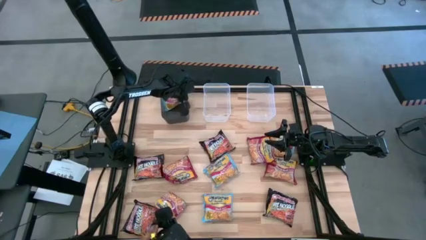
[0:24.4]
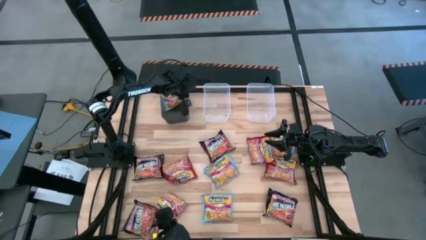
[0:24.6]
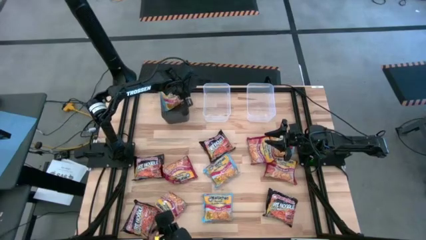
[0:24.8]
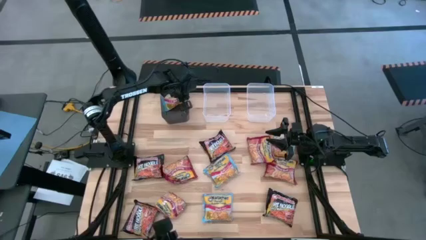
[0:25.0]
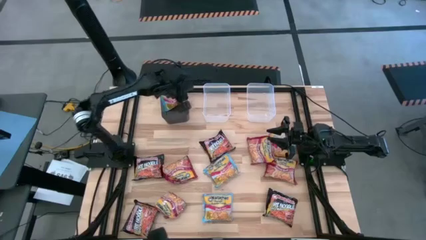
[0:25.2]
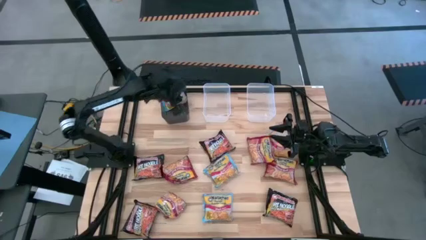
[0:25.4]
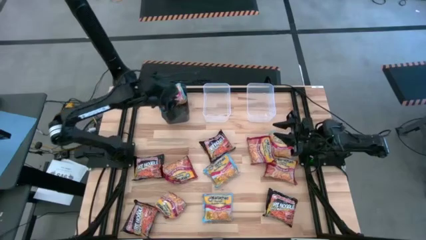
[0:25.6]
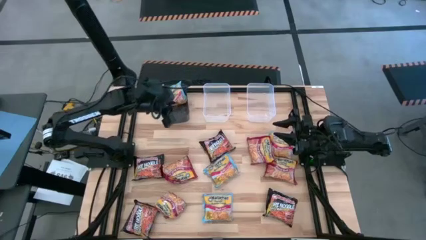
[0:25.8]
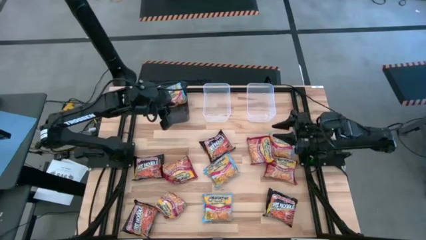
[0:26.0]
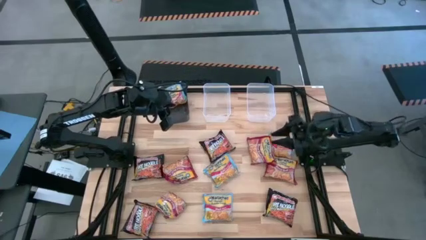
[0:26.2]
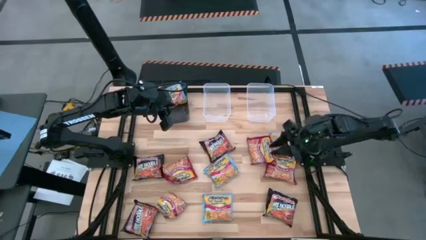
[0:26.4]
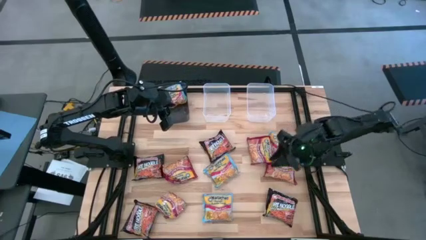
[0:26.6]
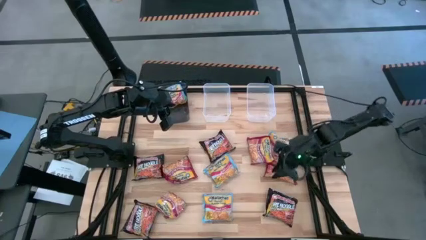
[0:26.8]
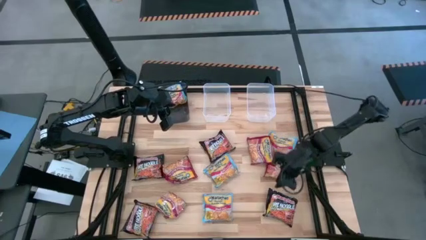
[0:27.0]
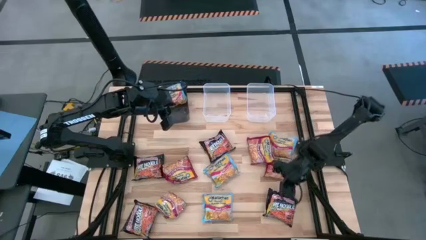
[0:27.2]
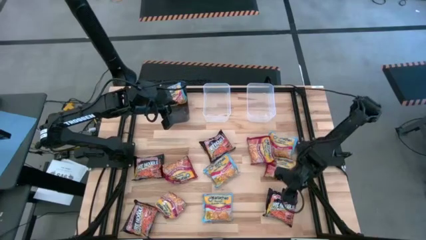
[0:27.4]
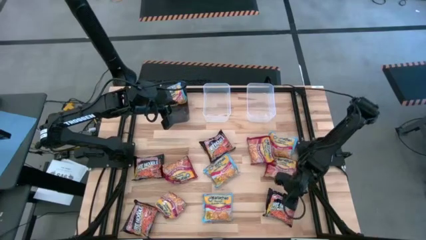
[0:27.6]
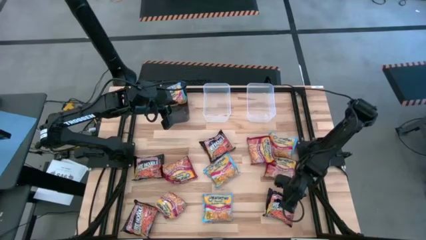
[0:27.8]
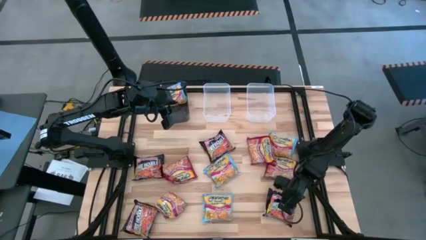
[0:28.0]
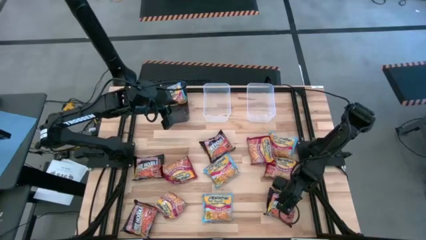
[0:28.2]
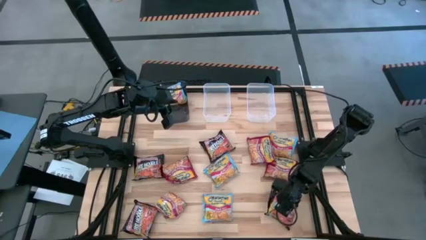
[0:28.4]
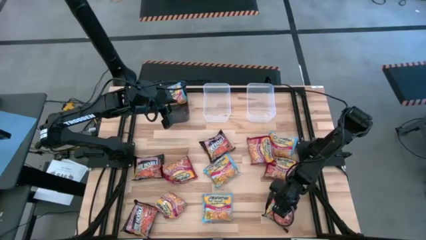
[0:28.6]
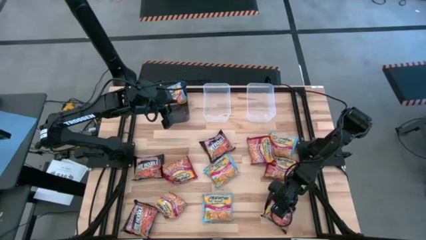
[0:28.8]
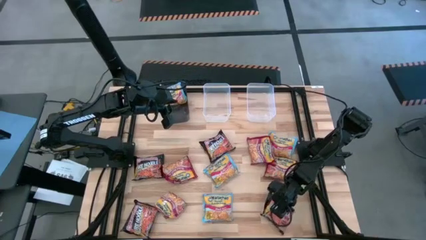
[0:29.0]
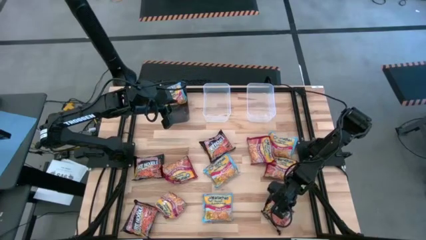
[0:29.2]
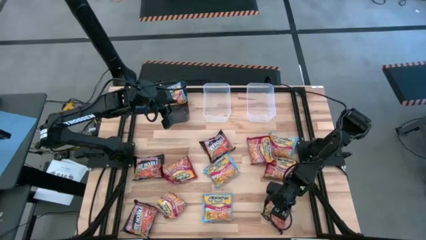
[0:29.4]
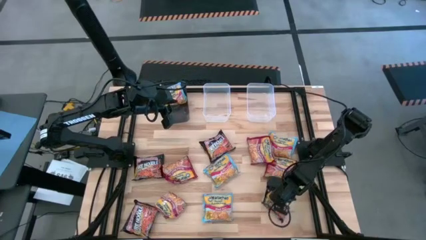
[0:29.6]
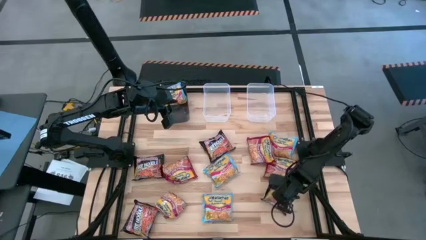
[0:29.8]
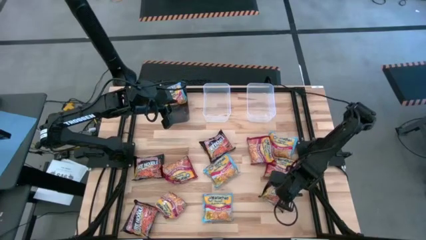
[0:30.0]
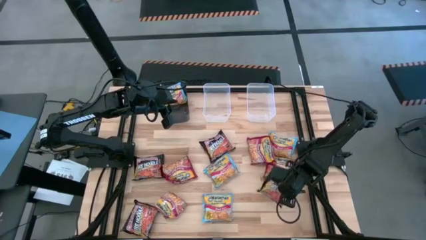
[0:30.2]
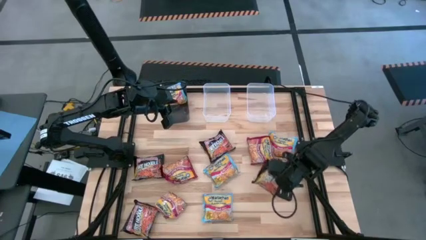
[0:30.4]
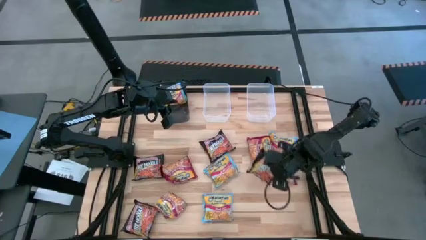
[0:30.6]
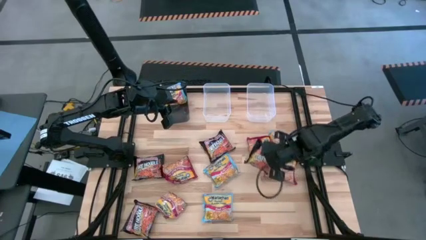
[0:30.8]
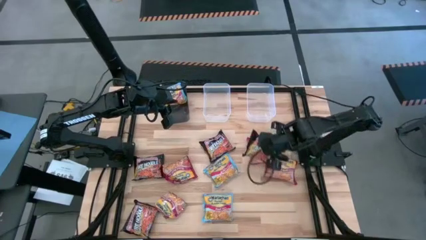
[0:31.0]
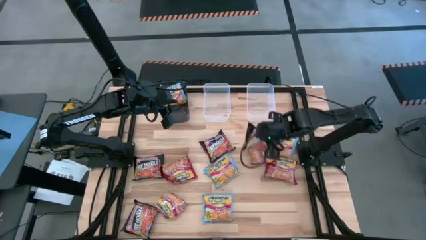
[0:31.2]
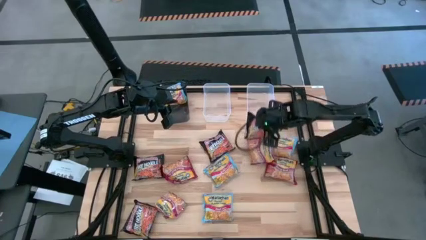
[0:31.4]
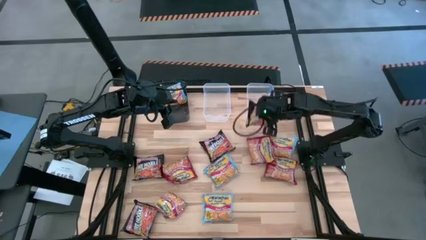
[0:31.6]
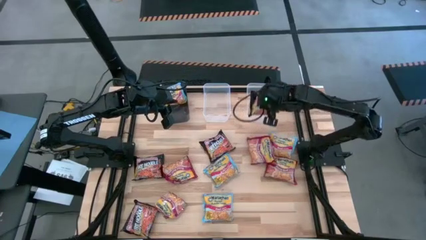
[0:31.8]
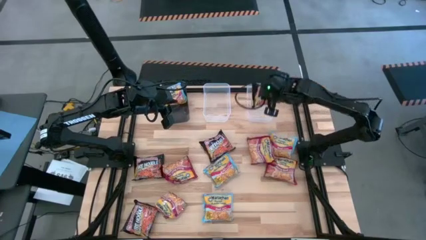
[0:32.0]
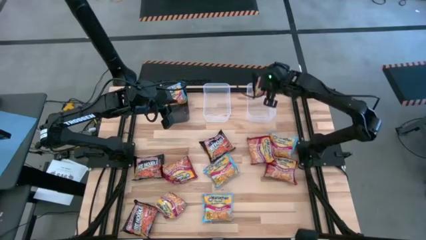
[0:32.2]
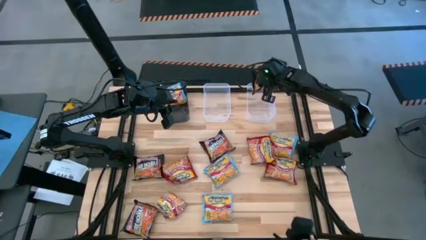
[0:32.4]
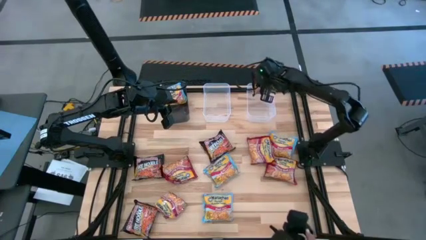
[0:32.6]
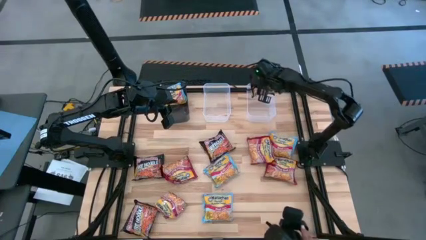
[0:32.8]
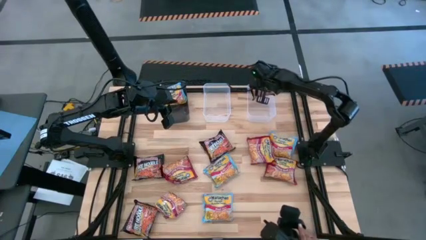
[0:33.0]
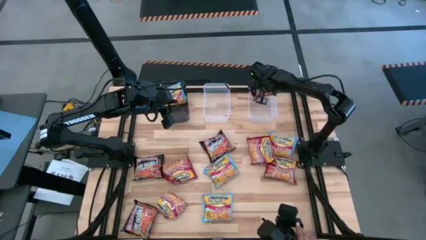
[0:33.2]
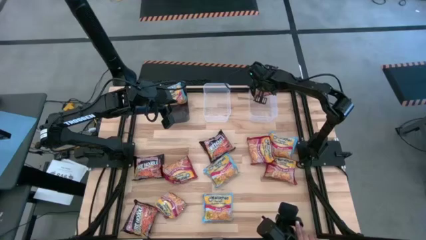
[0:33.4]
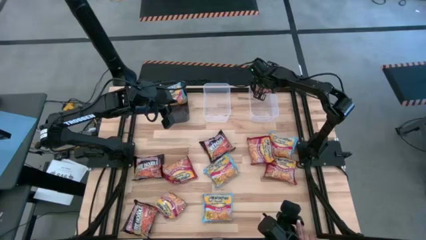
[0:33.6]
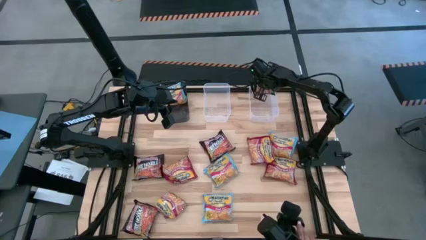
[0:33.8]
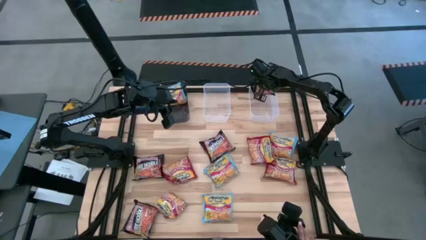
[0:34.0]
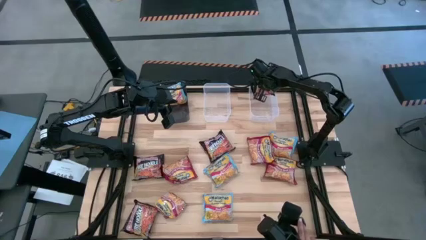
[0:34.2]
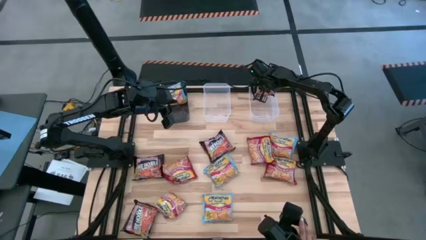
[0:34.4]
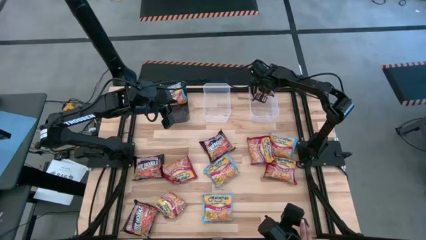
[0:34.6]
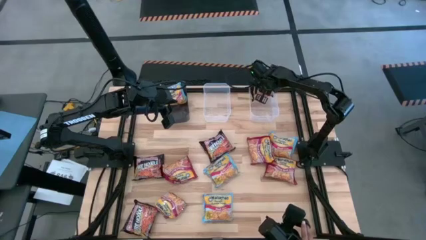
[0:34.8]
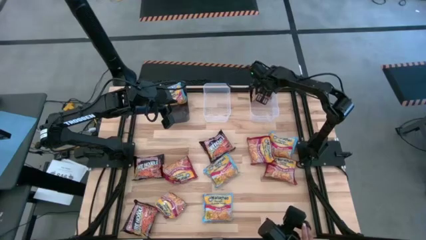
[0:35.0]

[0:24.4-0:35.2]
Task: Sort Maruchan noodles
Put the black noodle pack into the right transparent bin

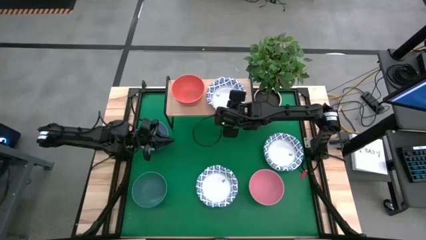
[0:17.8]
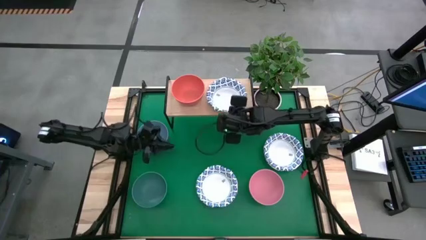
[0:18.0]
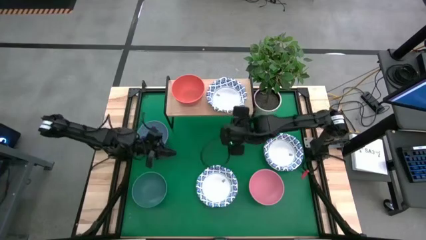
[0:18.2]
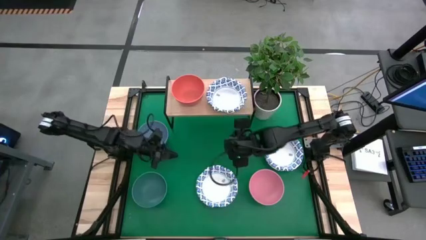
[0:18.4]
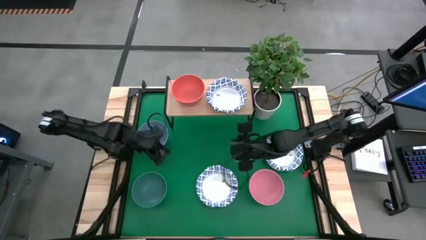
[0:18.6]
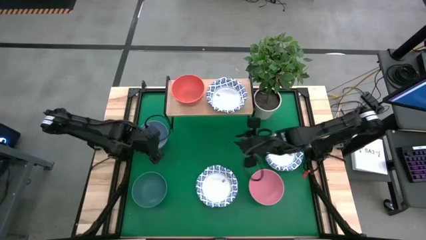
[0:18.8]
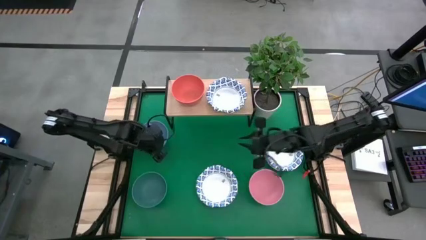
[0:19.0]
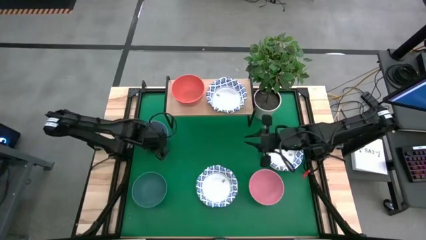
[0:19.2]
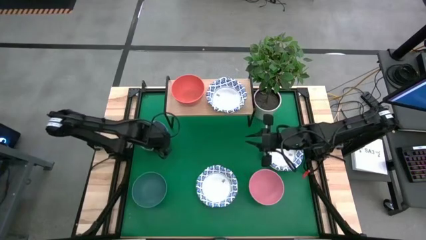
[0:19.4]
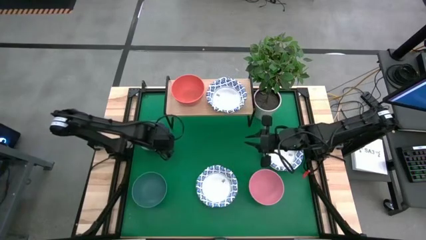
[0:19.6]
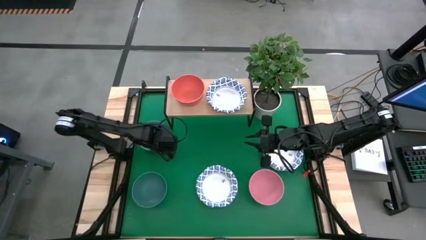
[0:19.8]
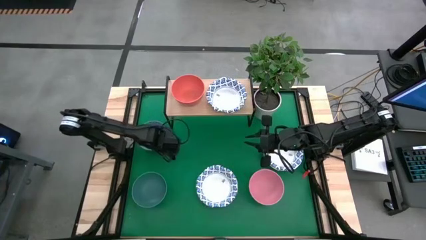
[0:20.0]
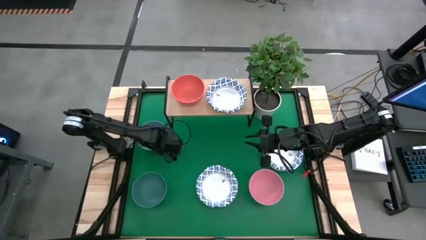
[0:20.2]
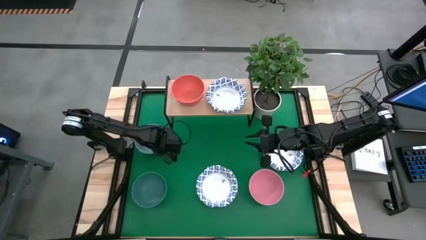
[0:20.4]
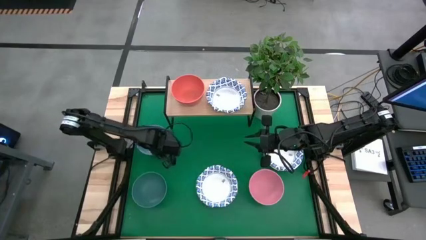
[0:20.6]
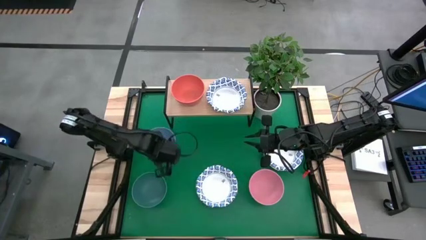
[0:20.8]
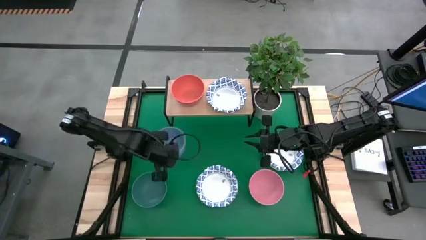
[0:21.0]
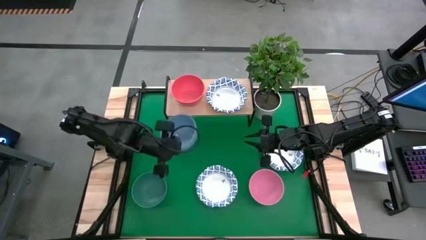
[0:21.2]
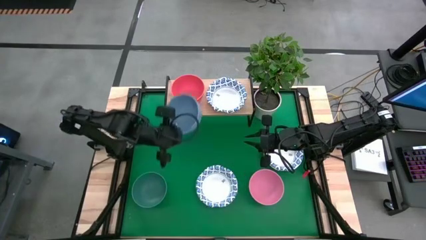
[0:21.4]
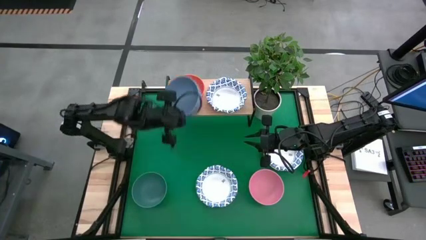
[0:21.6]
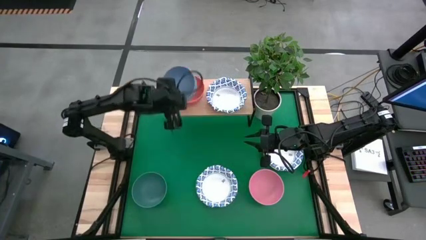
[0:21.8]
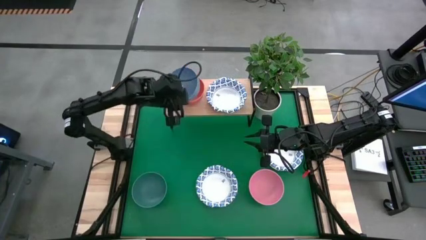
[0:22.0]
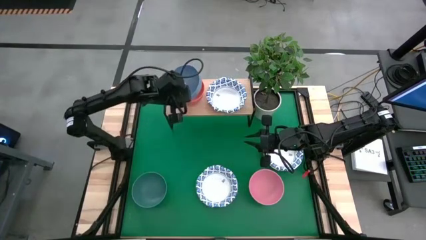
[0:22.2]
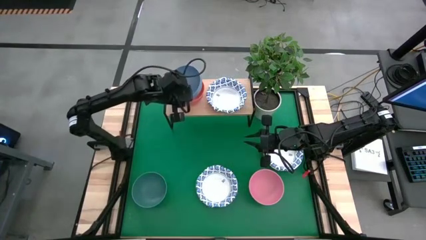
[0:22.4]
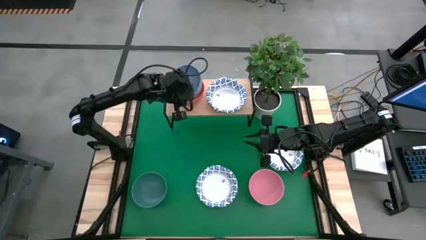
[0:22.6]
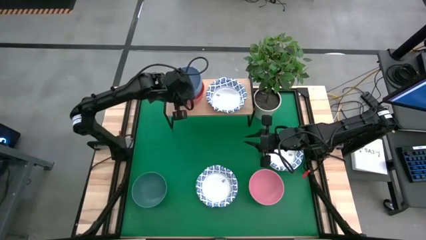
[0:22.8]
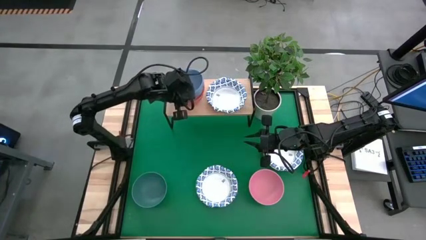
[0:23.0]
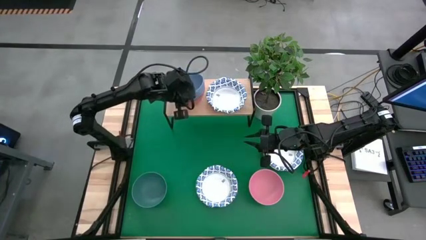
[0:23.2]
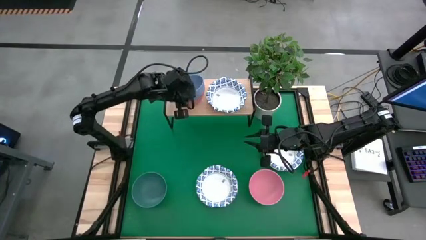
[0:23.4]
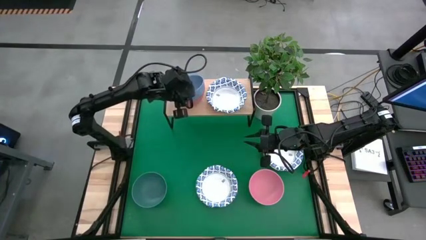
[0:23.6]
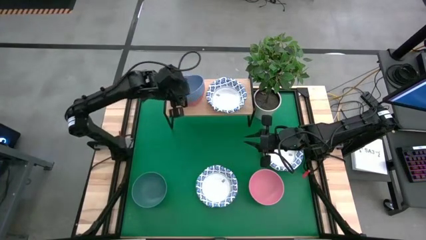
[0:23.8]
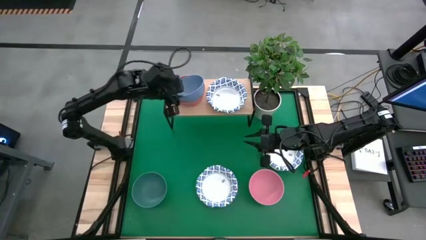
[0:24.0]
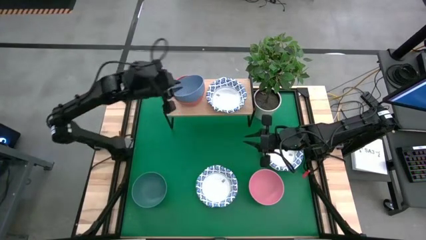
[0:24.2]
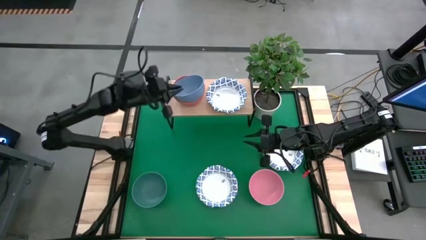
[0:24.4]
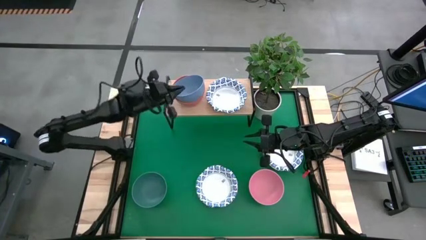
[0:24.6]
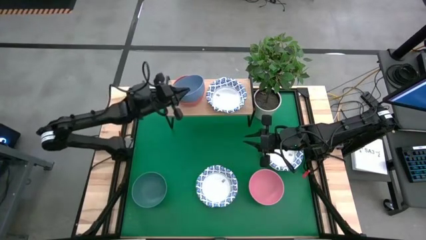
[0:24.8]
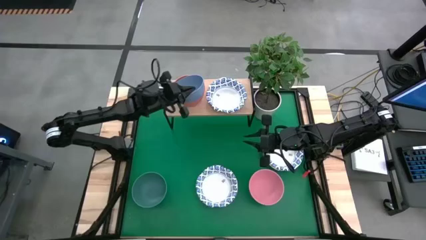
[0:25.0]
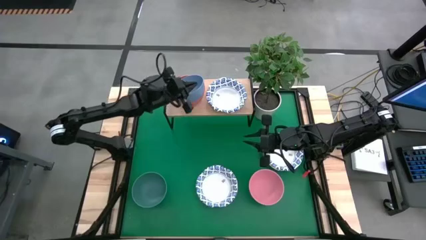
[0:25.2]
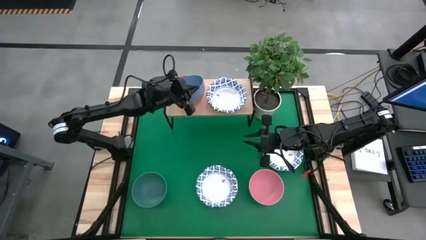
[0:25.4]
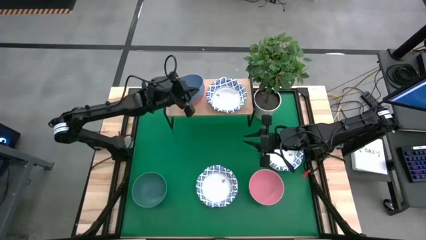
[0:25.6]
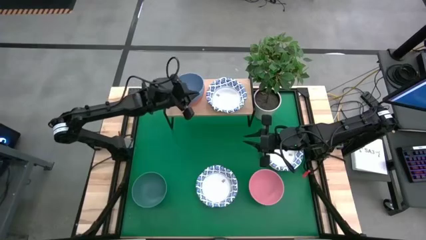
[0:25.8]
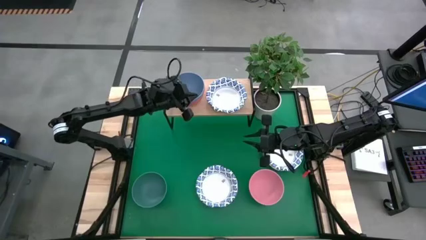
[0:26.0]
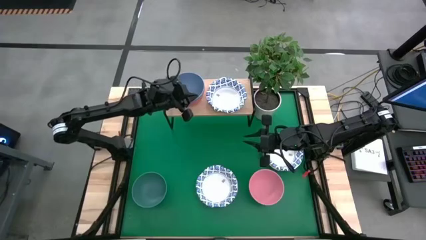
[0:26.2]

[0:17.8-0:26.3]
Task: Place and stack bowls onto a shelf
Stack the blue bowl on top of the orange bowl on the shelf
